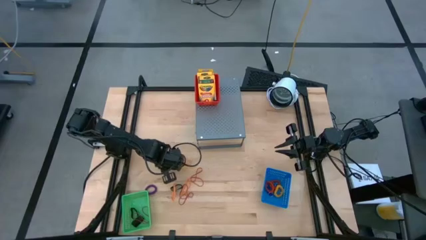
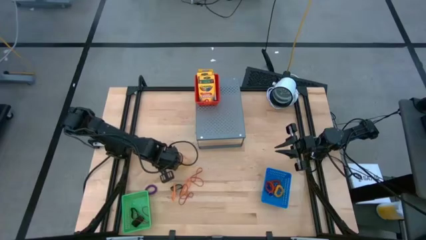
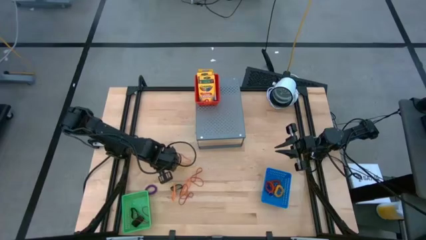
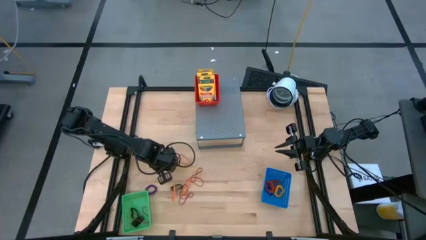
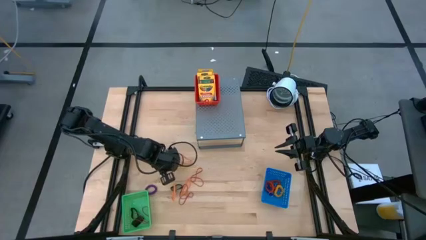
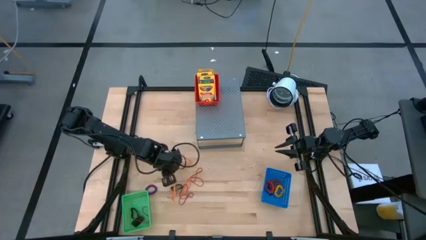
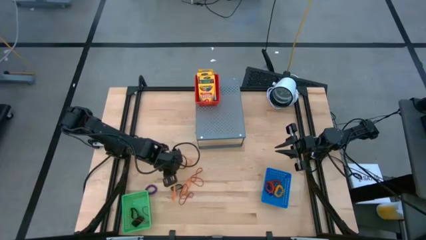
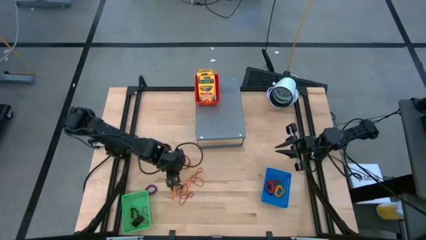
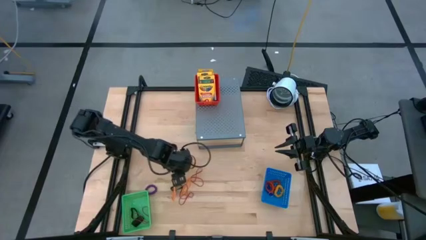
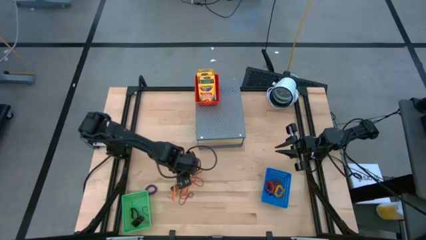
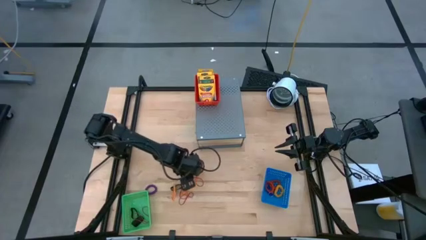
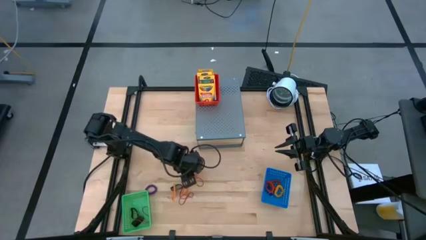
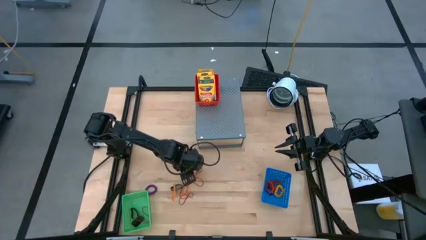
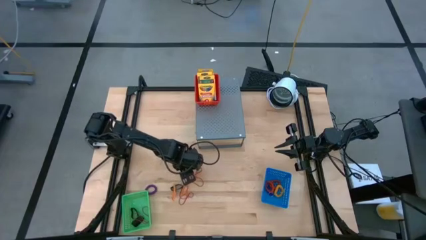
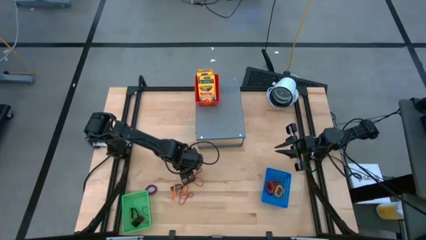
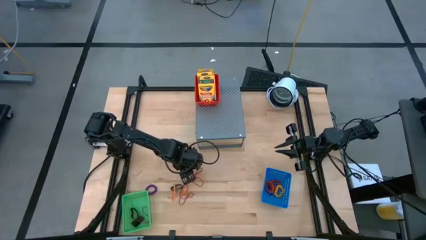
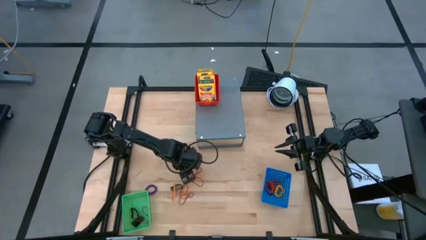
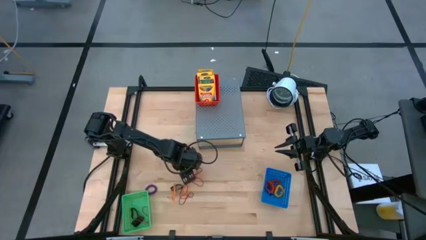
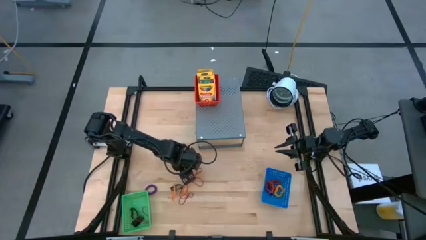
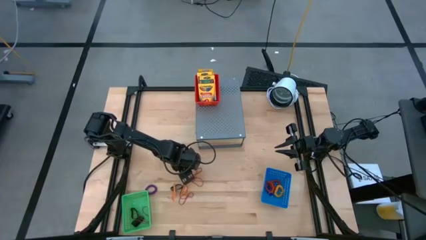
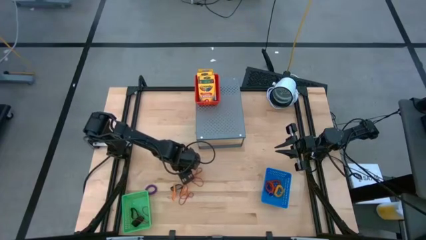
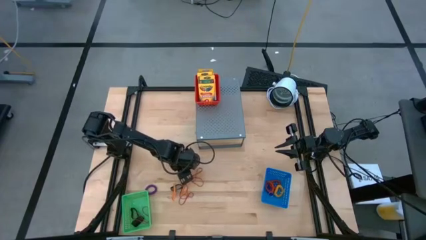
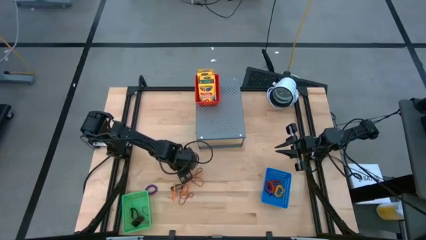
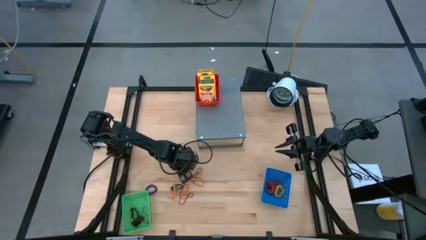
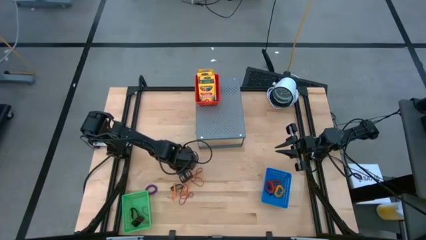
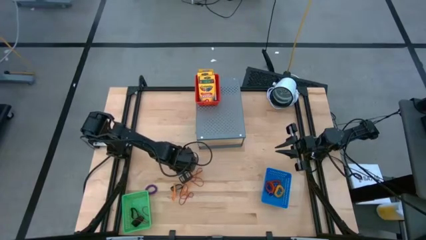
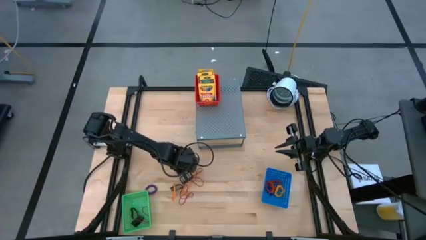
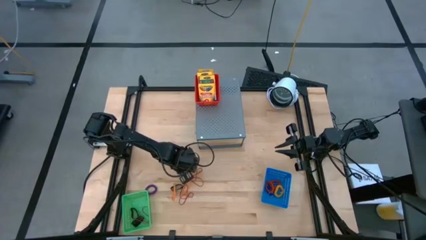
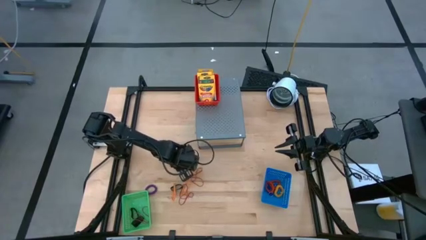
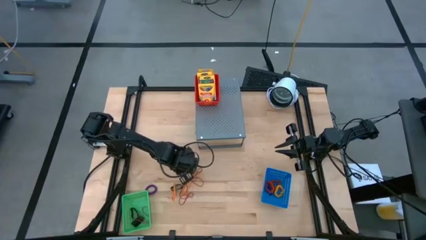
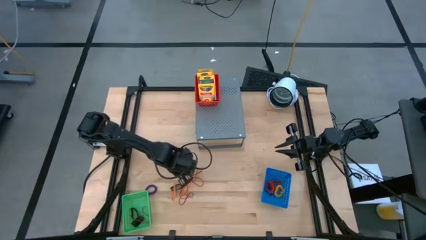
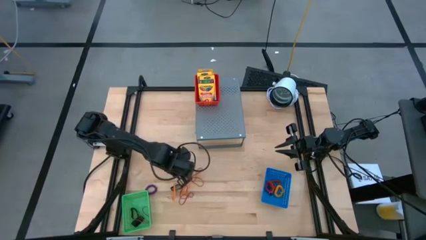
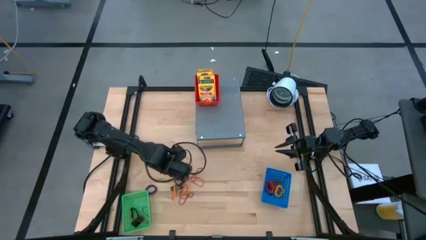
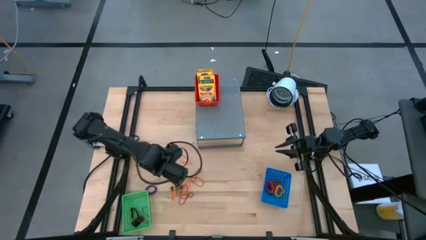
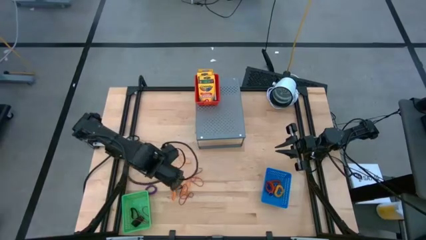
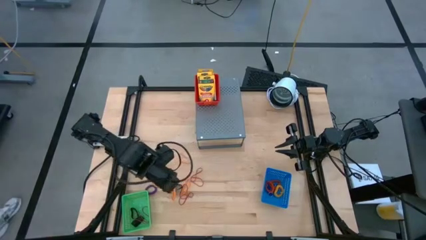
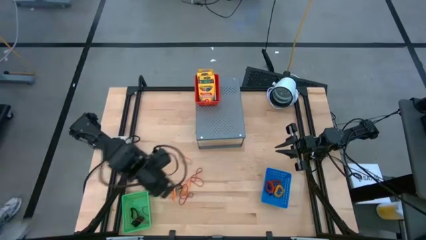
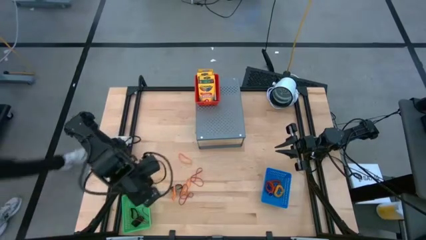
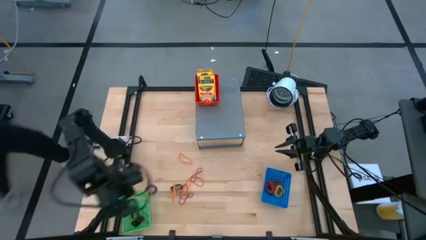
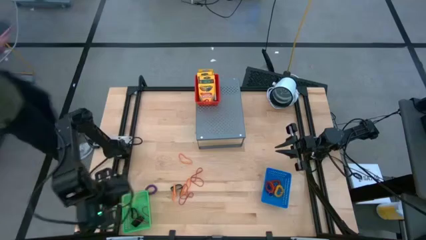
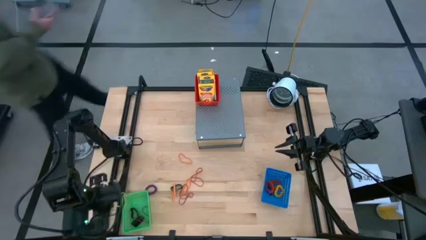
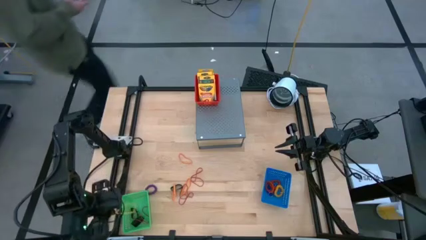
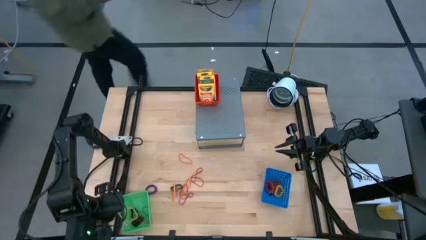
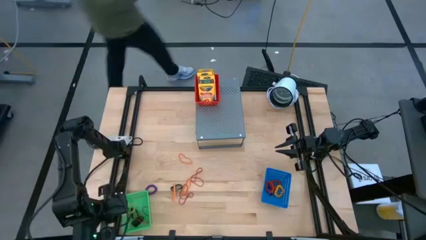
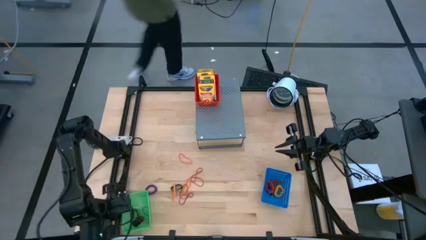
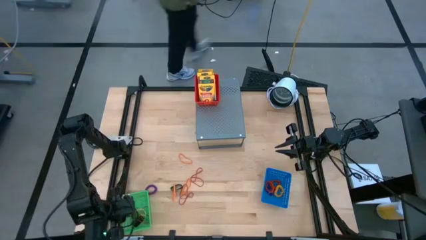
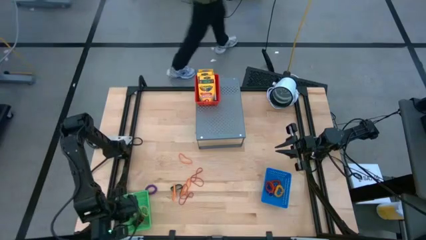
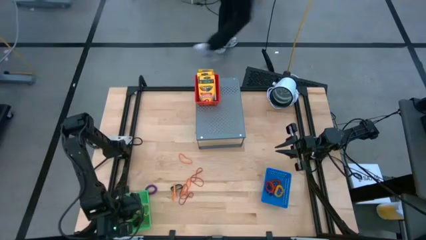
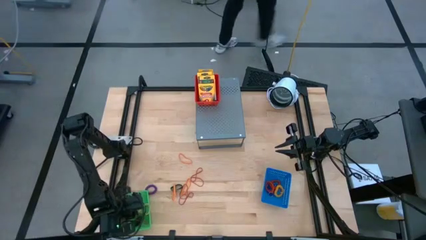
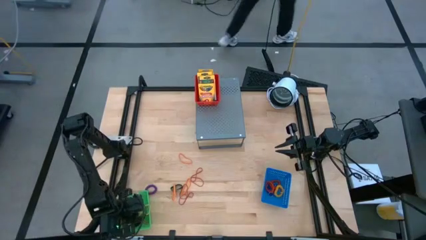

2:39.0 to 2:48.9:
Task: Pick & Place Office Desk Supplies
Put the yellow rubber band into the green bin

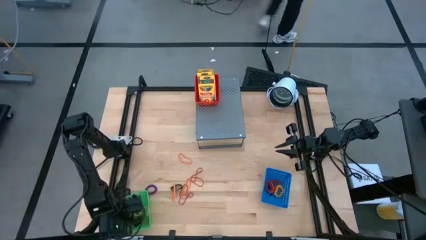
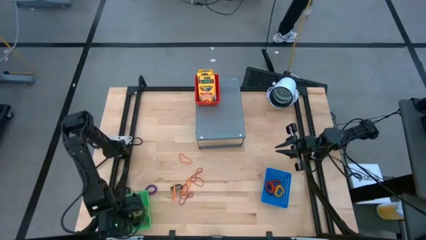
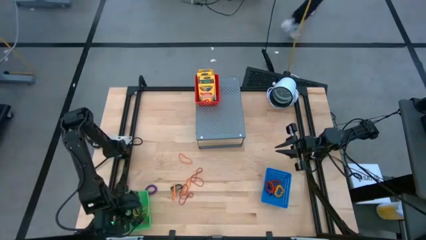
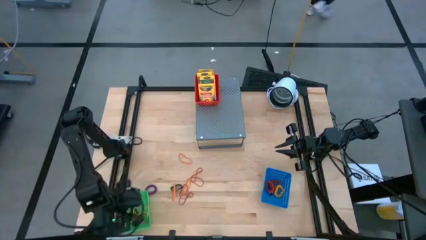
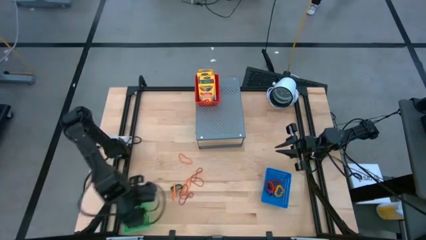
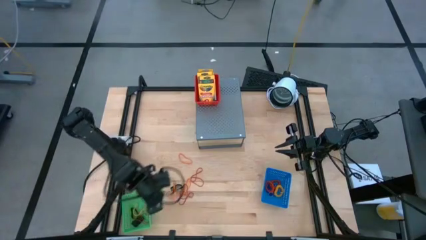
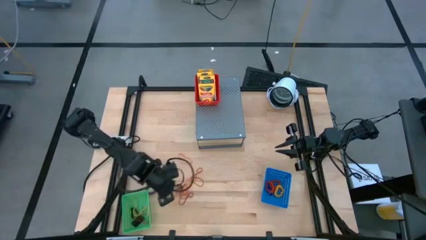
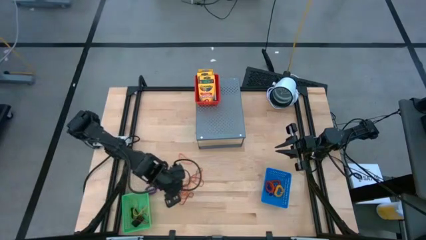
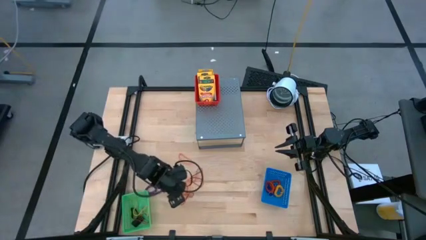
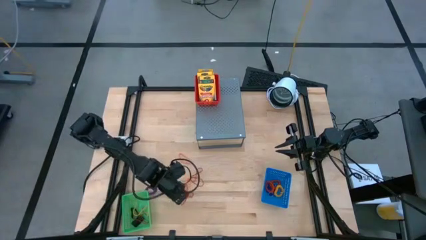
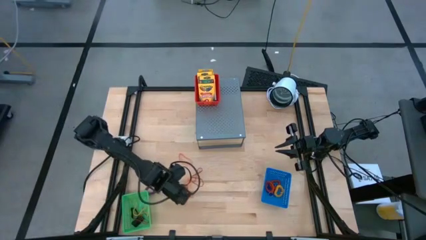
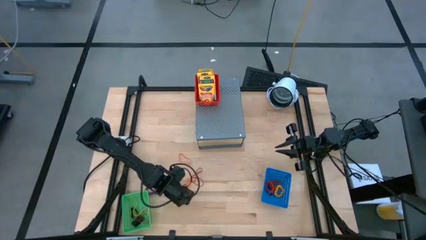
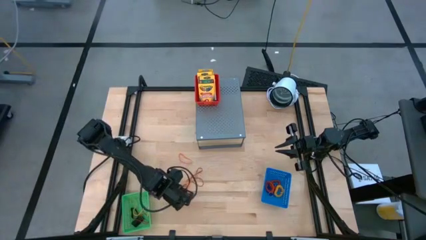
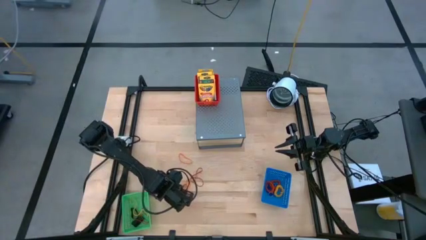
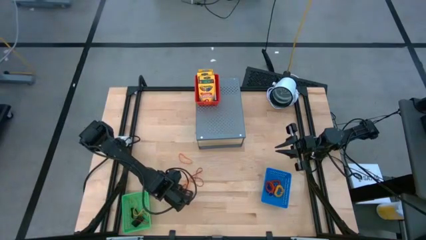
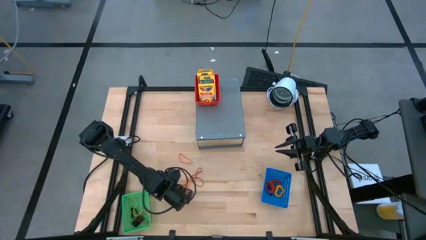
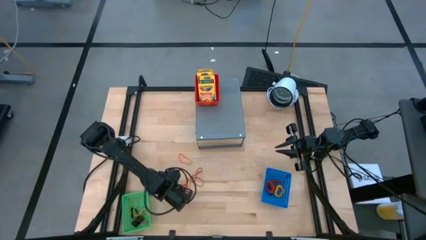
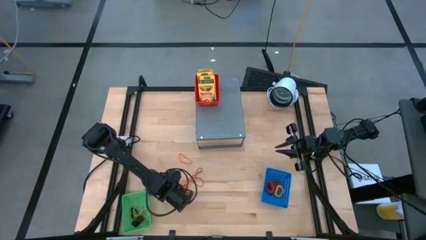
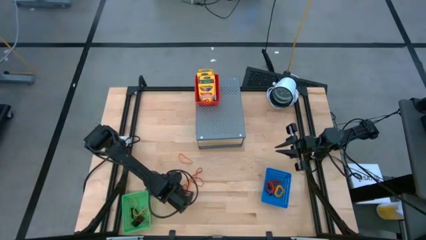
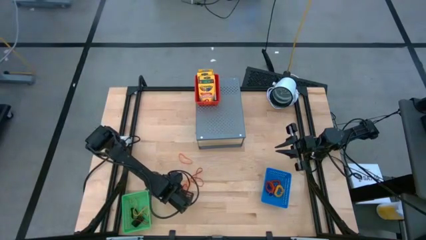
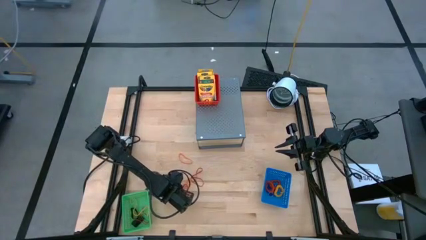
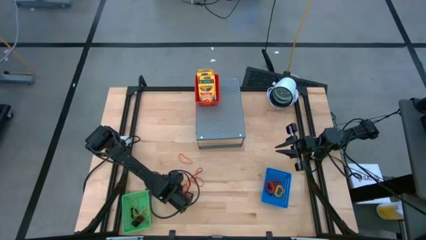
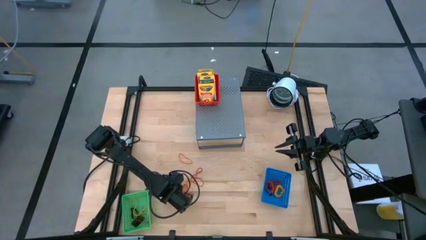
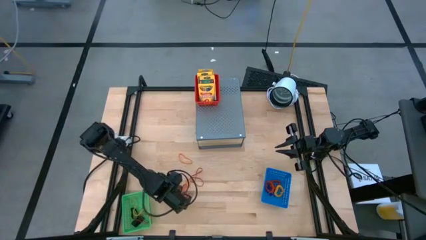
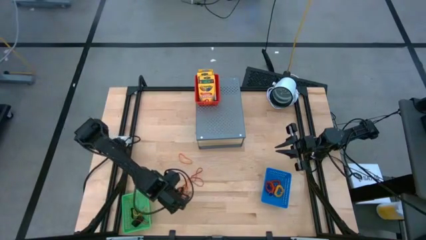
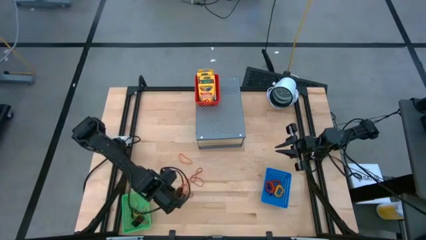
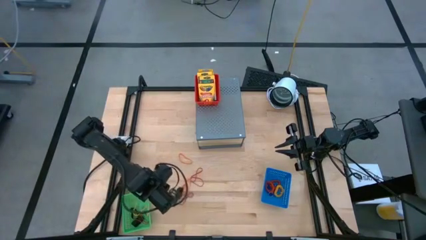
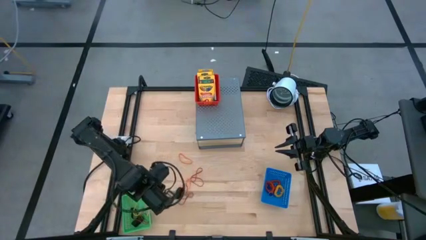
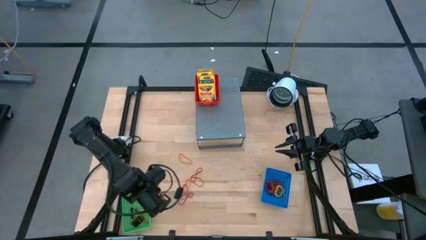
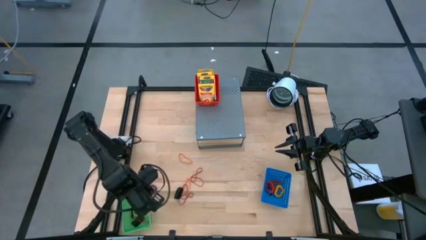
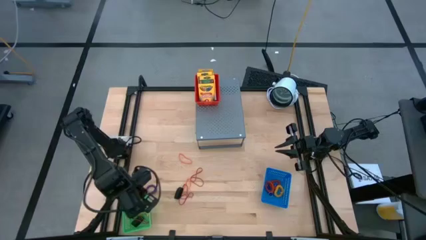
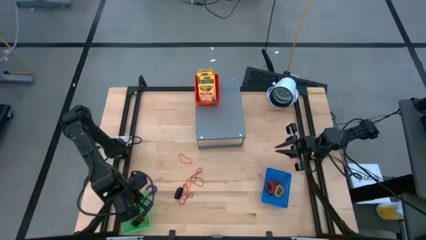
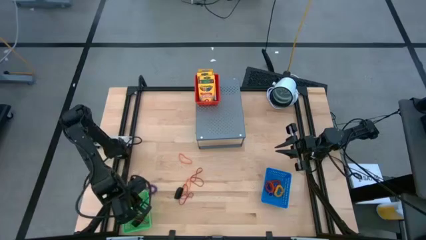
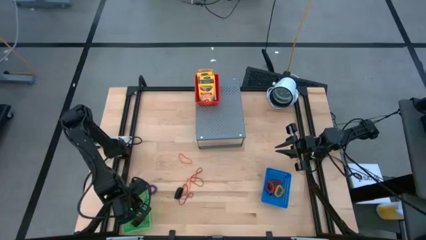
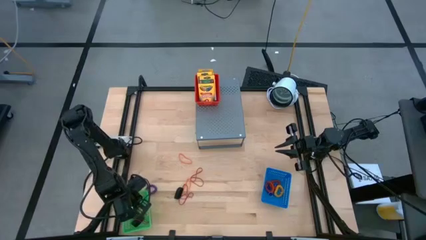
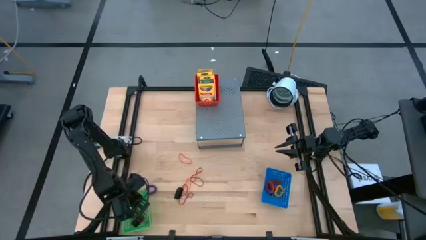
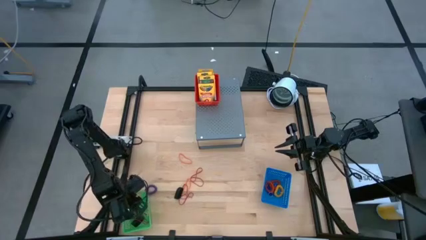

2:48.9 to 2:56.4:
Put the orange rubber band into the green bin
